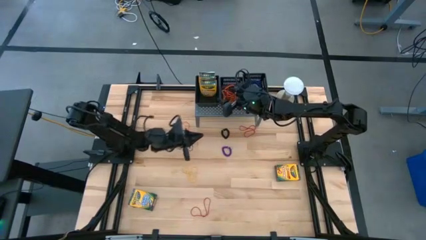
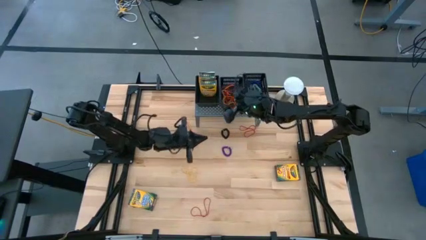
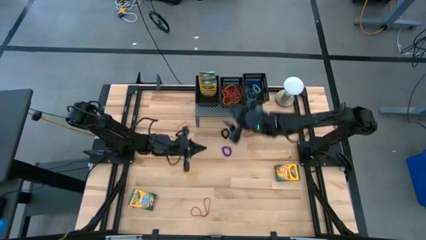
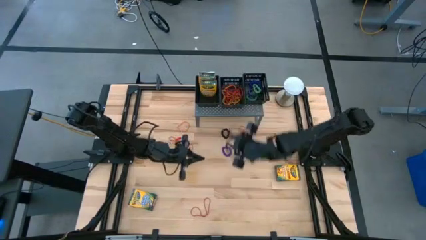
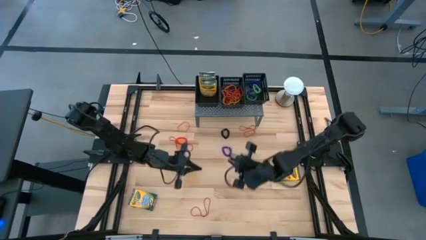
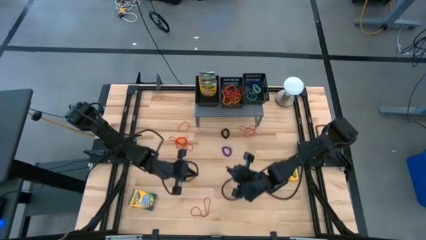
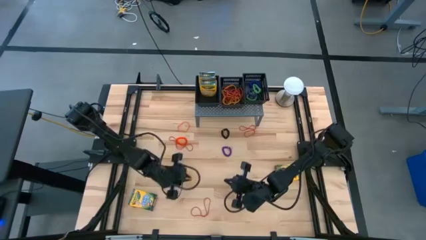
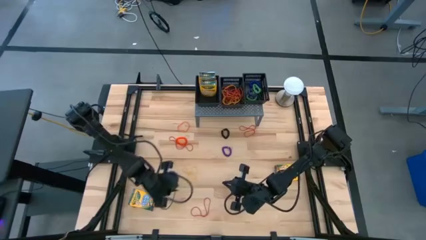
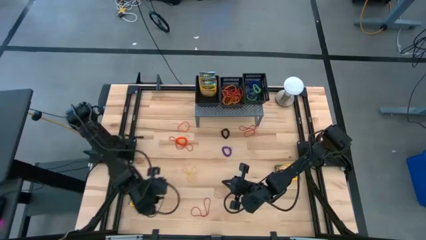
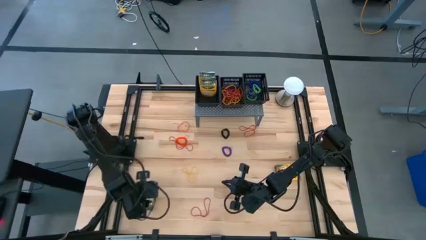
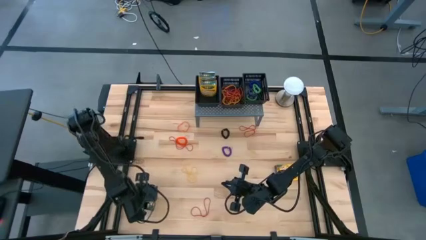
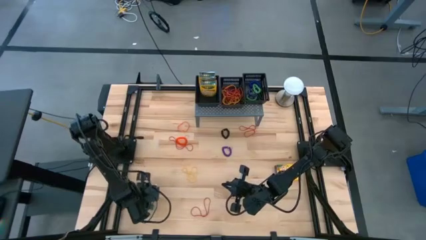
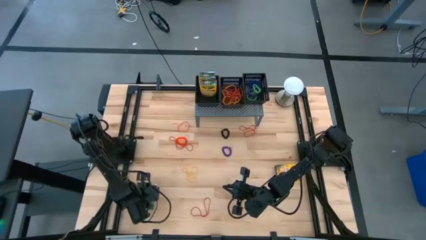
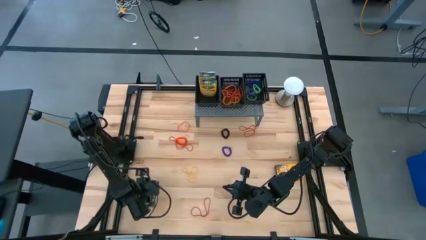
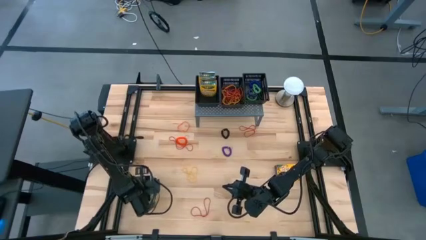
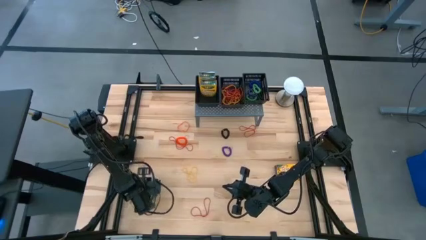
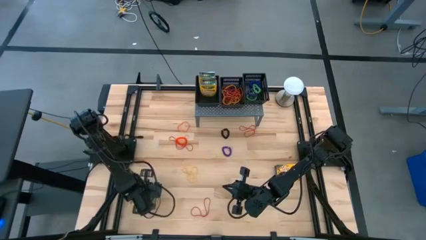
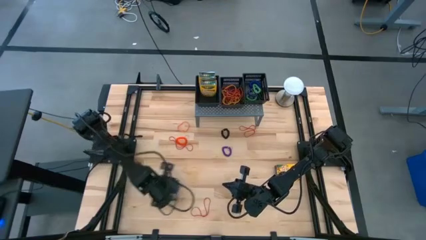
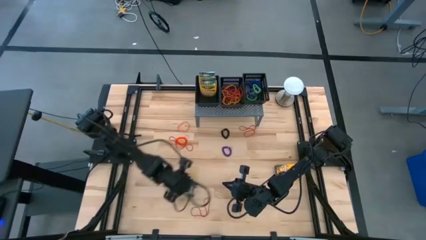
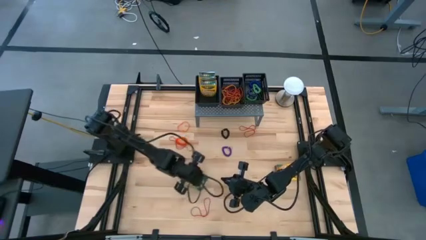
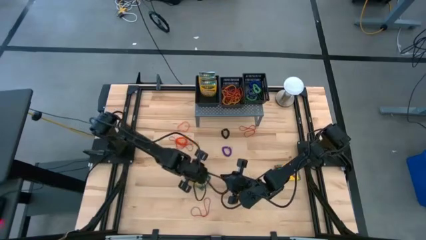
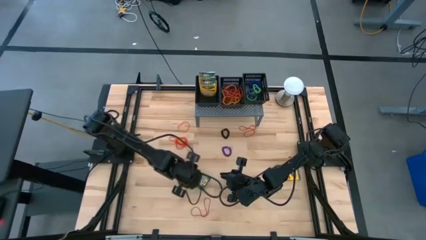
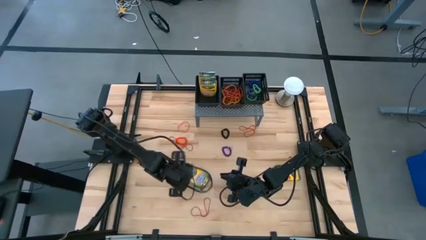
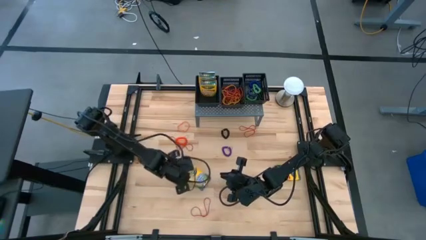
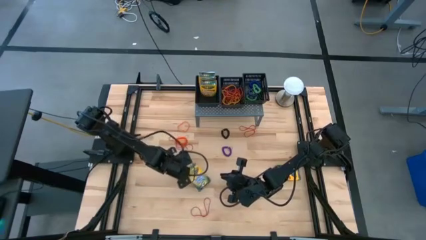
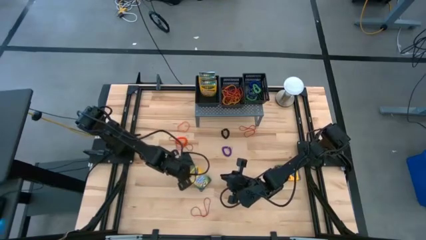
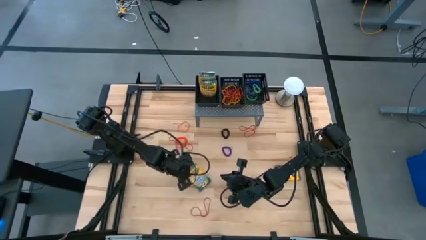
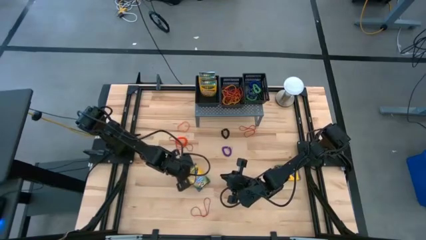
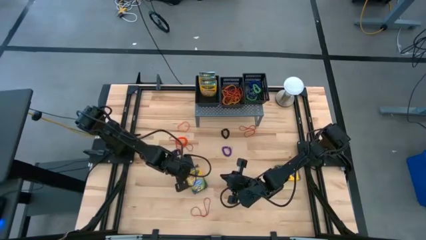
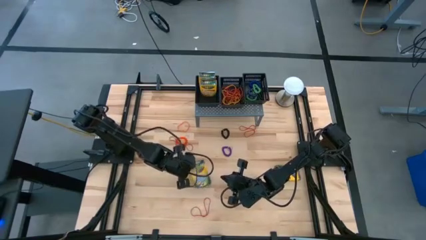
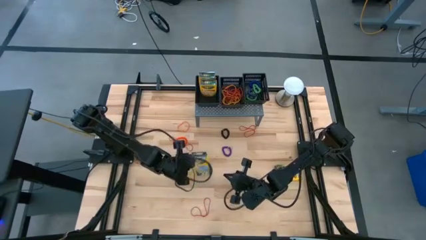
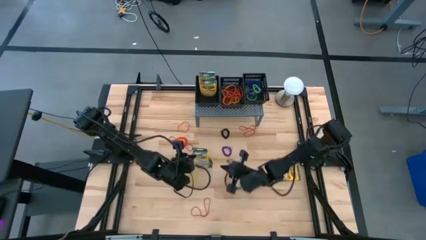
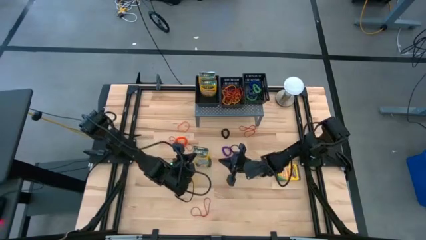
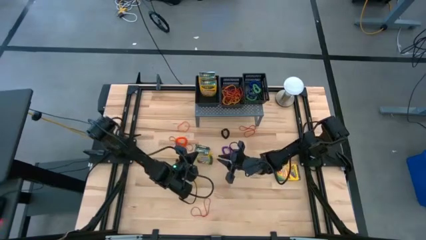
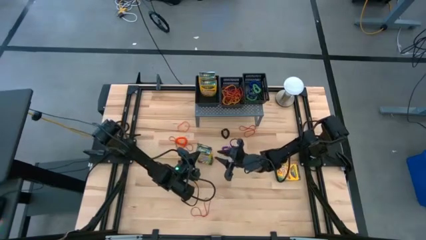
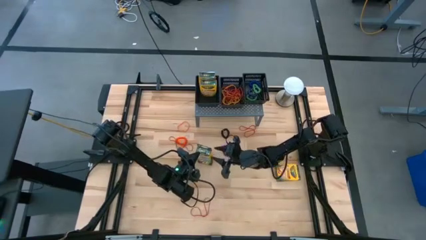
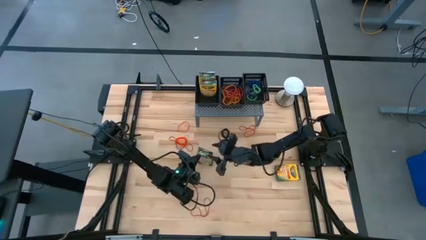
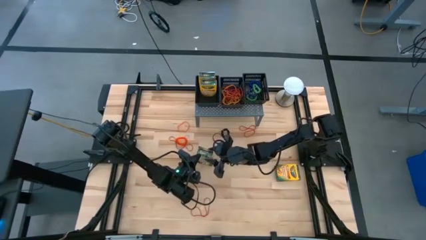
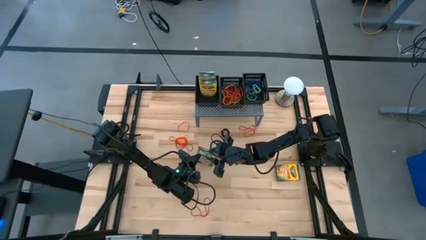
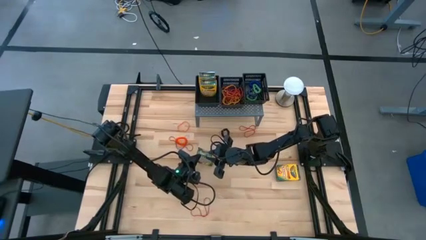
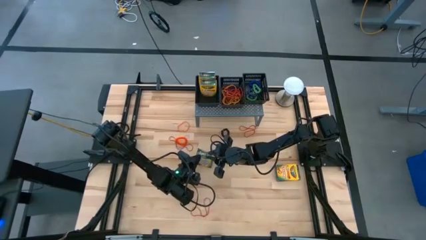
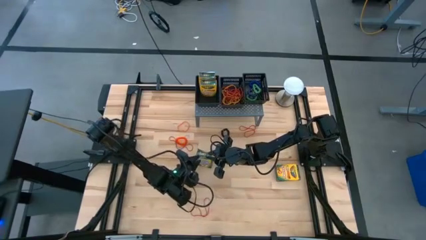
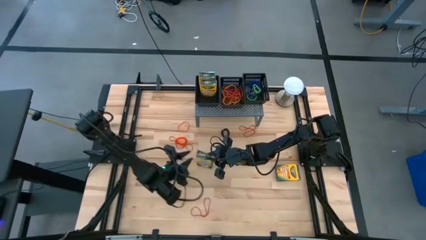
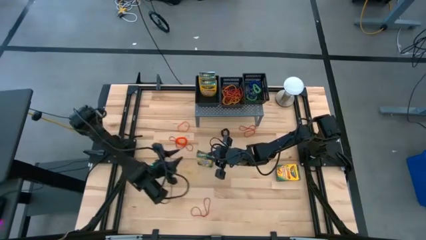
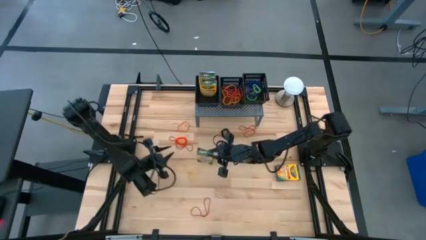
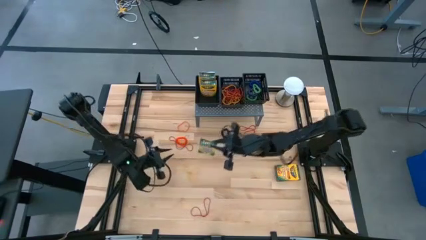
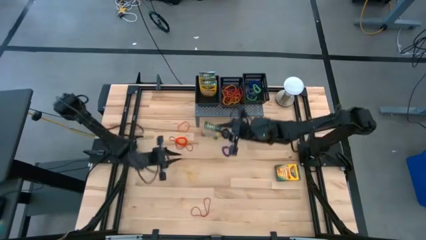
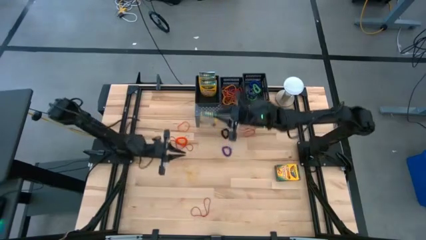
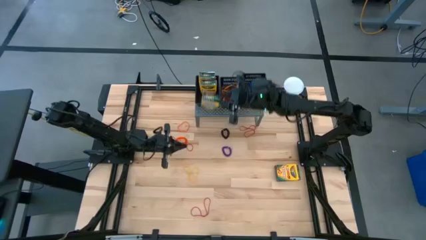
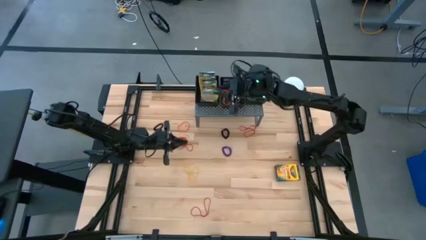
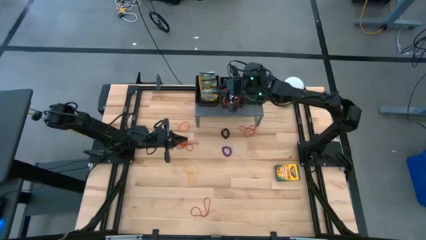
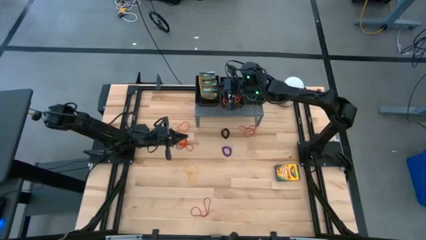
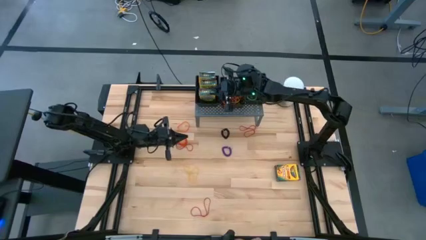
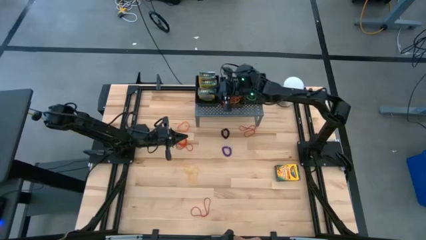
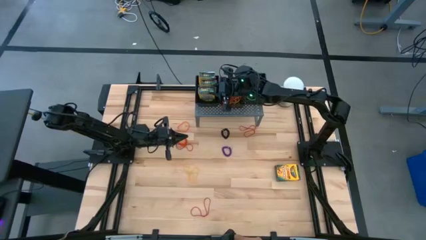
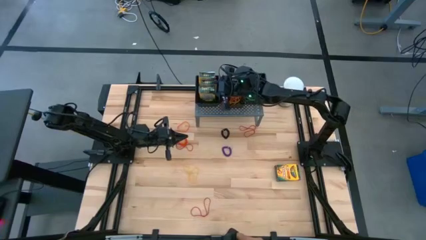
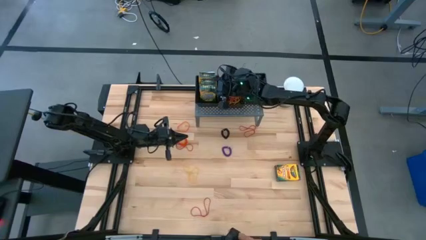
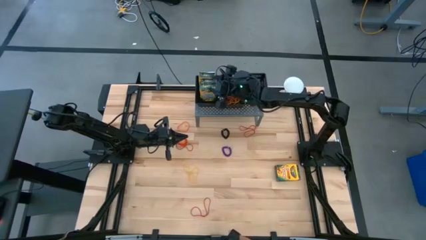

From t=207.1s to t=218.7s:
Task: Sort rubber bands into baskets
Put the crayon box into the left black basket on the shelf

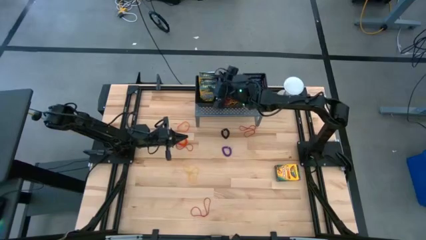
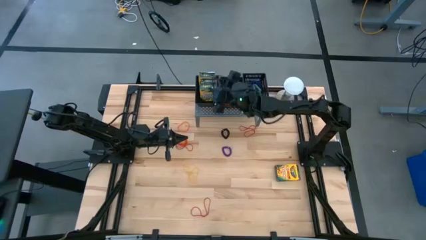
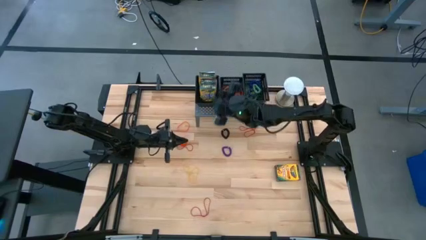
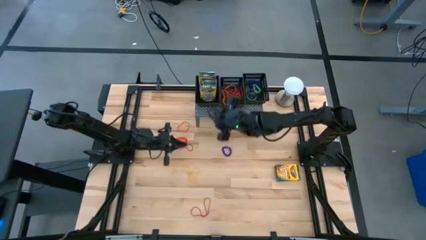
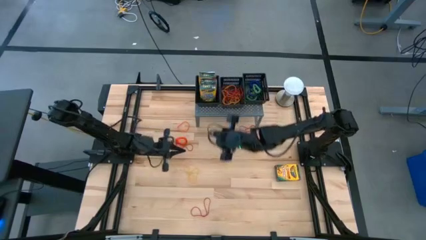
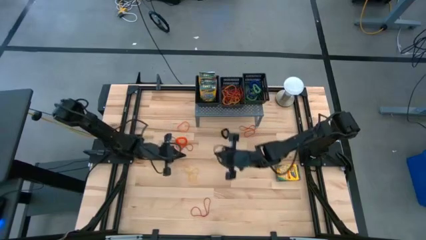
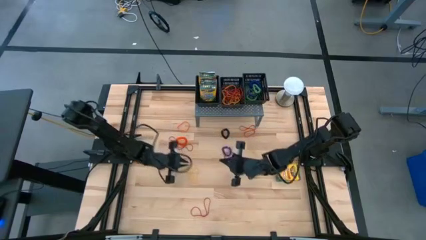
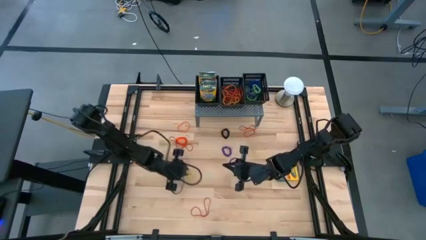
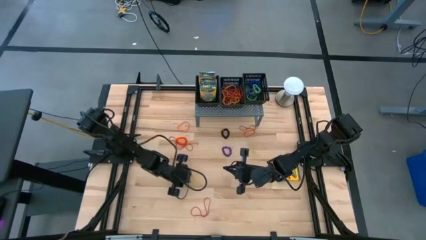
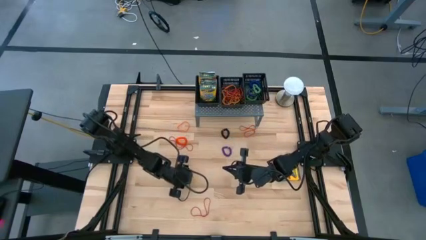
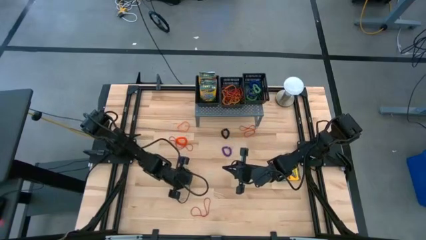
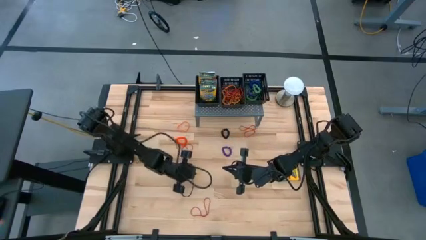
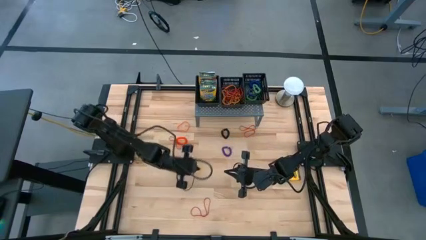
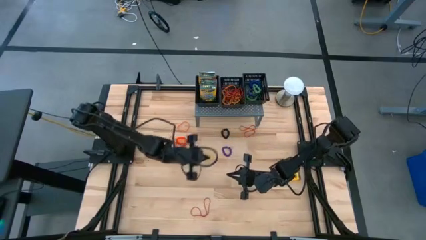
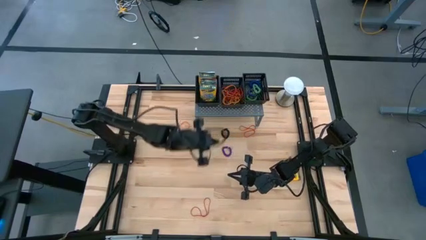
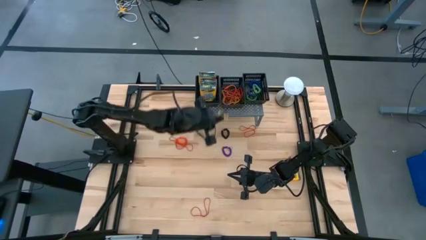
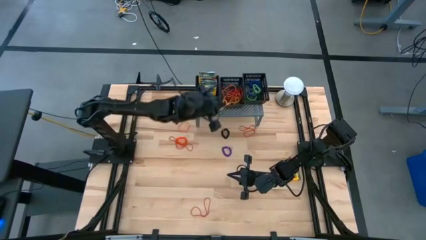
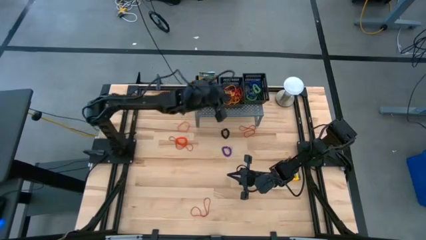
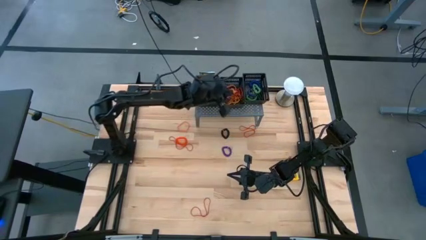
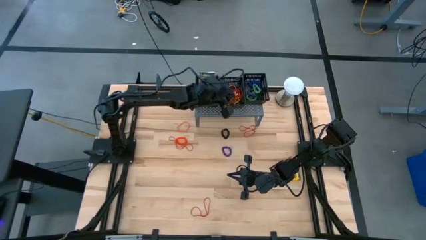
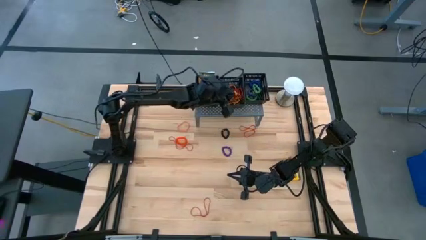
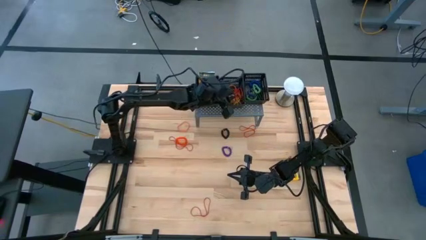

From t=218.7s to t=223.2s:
Put the yellow rubber band into the middle black basket on the shelf

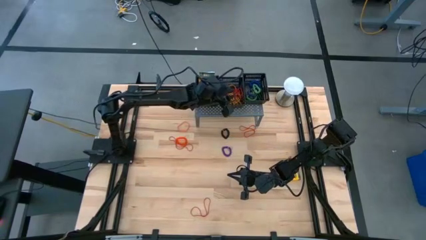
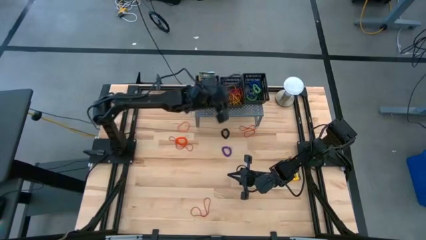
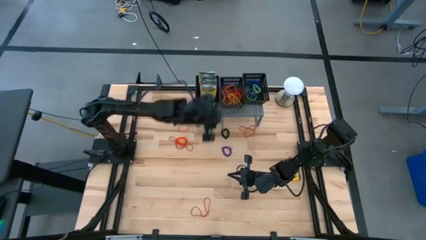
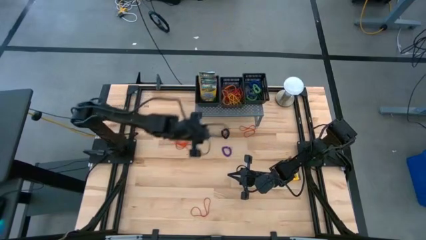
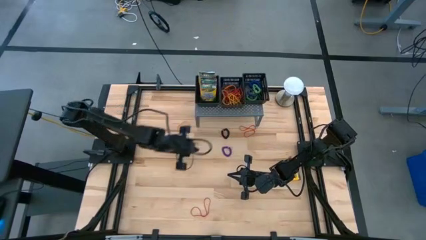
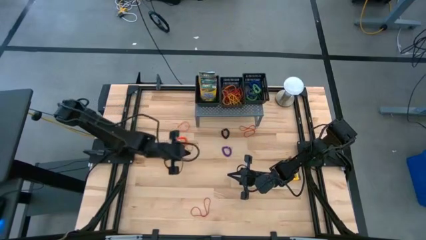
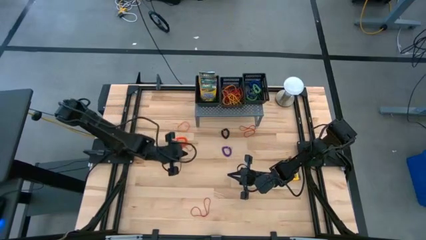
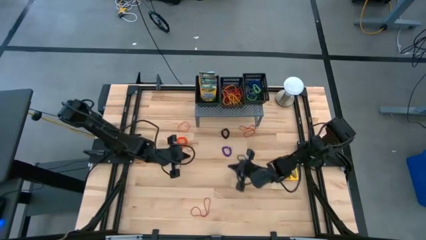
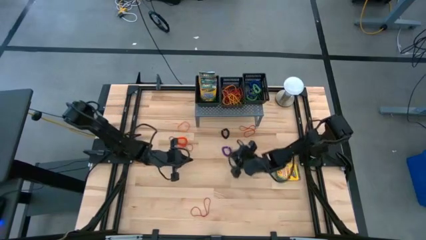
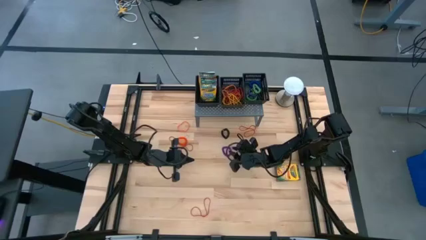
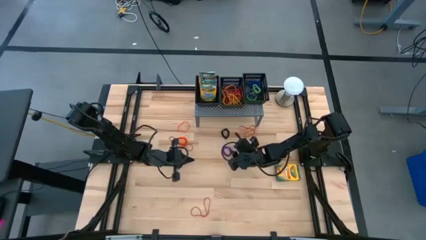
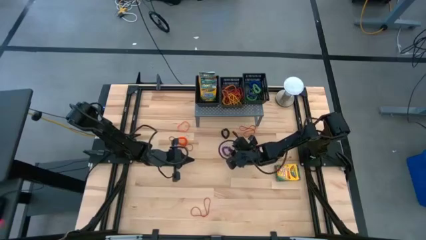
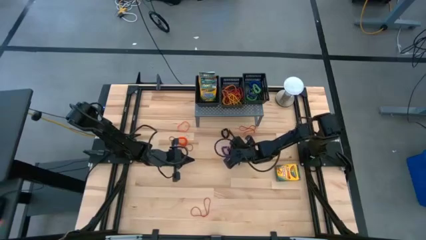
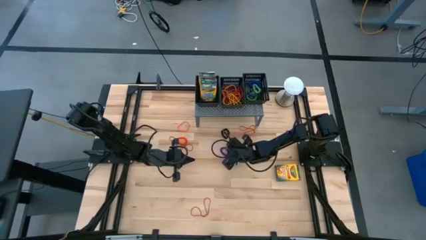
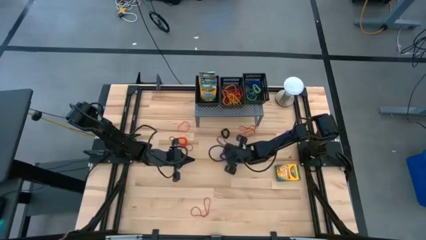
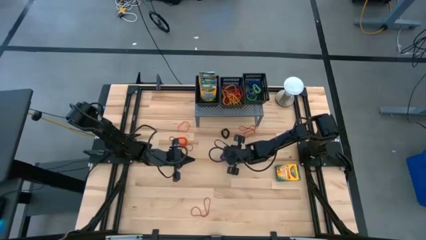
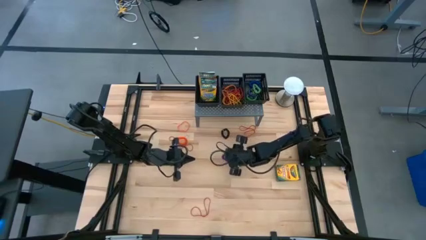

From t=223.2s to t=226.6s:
Put the purple spring rubberband into the right black basket on the shelf
